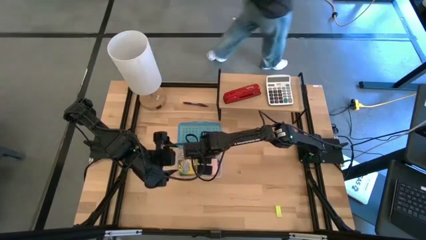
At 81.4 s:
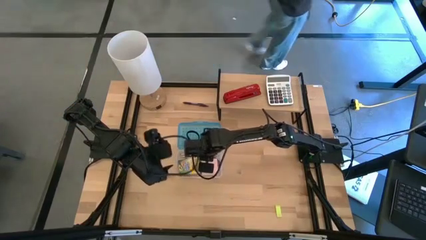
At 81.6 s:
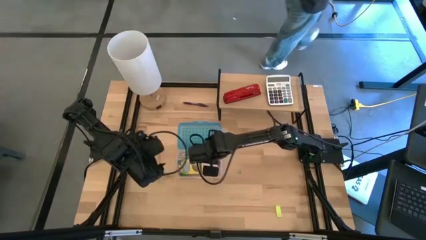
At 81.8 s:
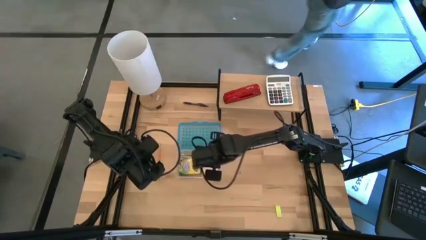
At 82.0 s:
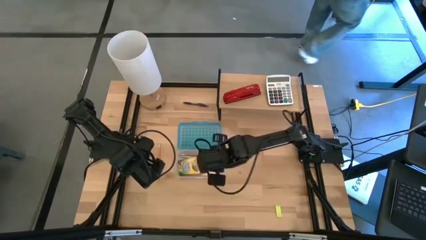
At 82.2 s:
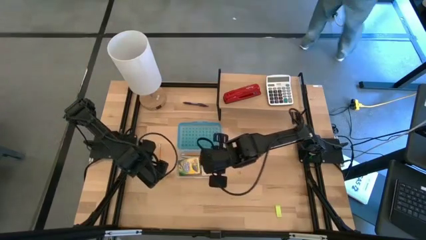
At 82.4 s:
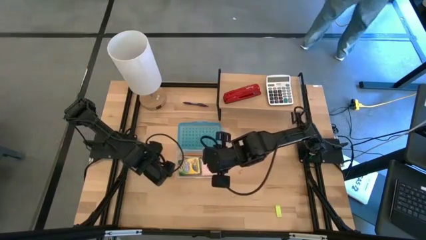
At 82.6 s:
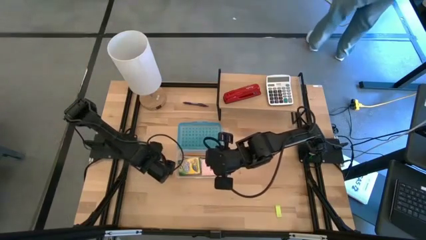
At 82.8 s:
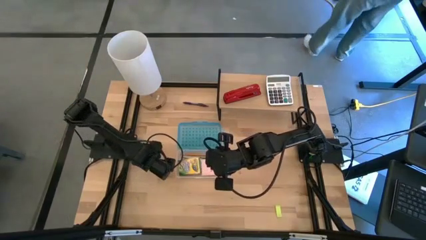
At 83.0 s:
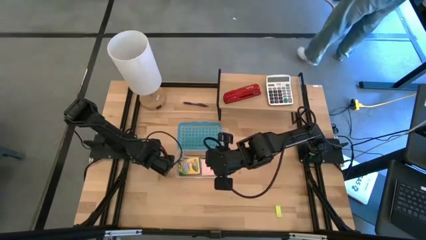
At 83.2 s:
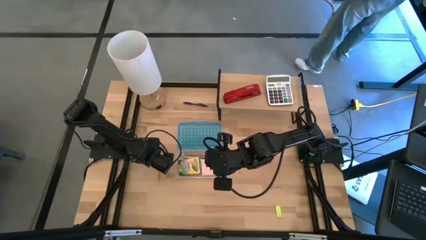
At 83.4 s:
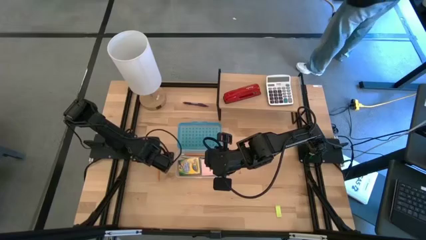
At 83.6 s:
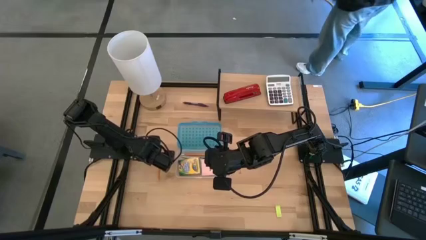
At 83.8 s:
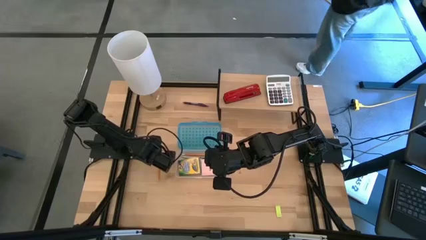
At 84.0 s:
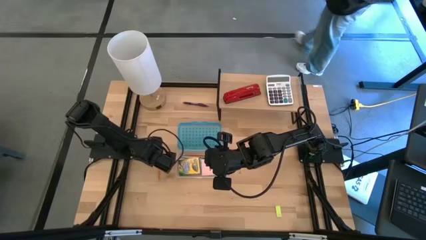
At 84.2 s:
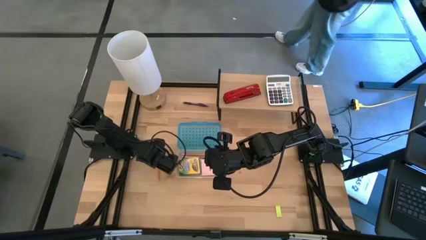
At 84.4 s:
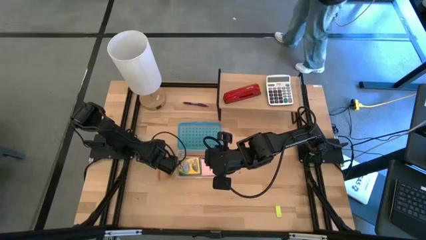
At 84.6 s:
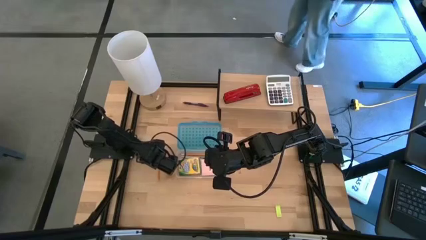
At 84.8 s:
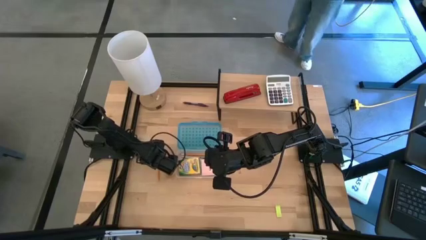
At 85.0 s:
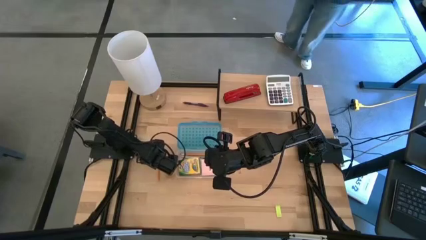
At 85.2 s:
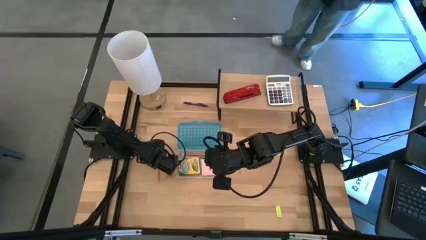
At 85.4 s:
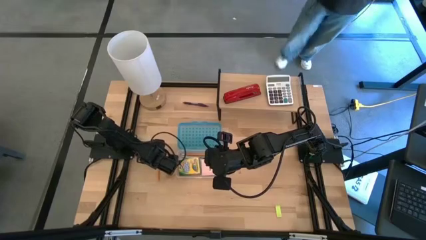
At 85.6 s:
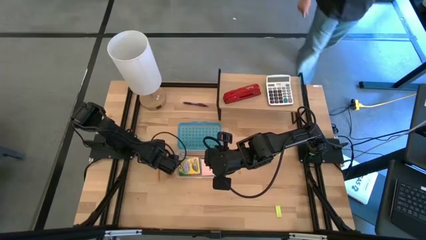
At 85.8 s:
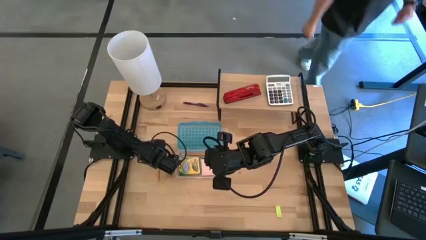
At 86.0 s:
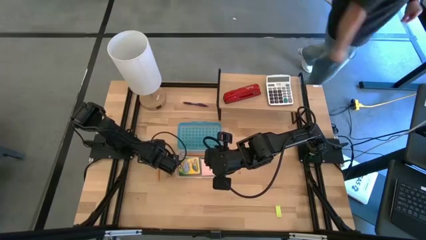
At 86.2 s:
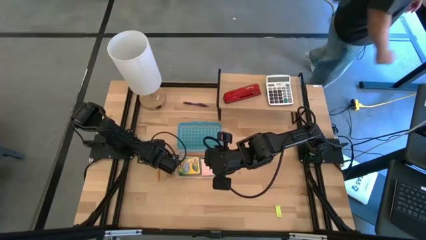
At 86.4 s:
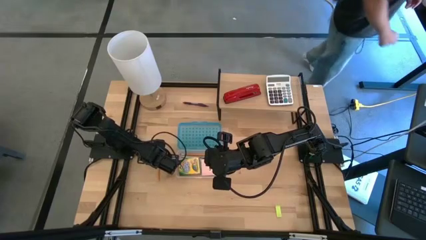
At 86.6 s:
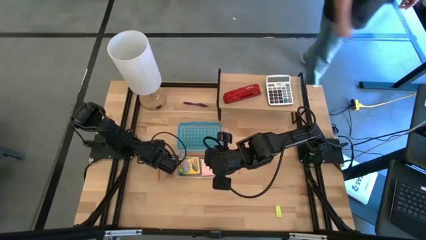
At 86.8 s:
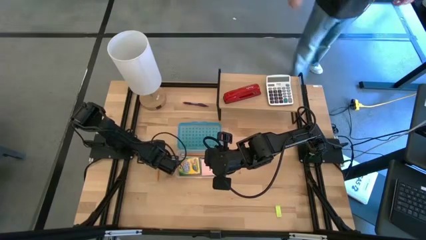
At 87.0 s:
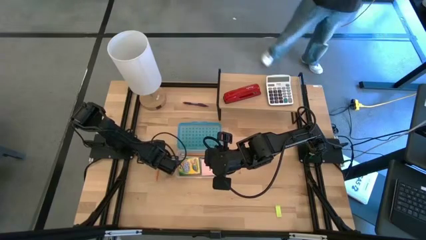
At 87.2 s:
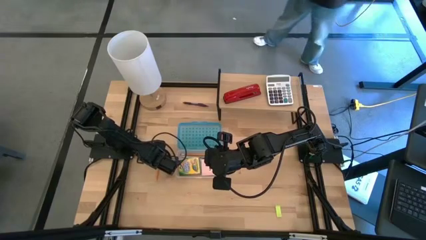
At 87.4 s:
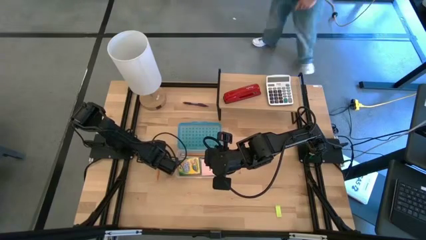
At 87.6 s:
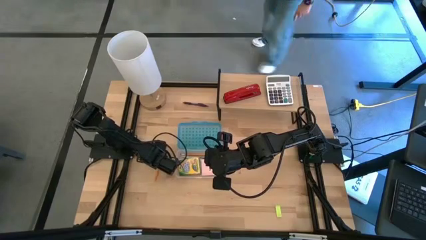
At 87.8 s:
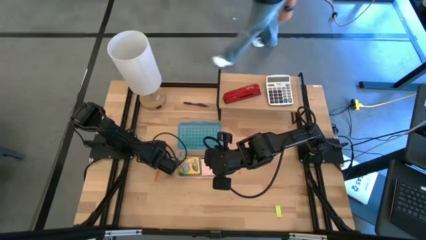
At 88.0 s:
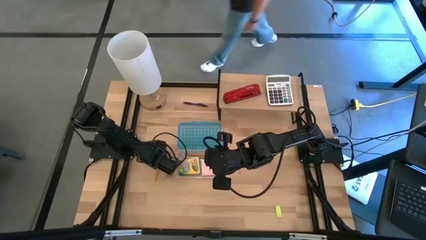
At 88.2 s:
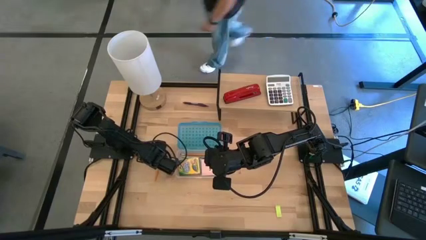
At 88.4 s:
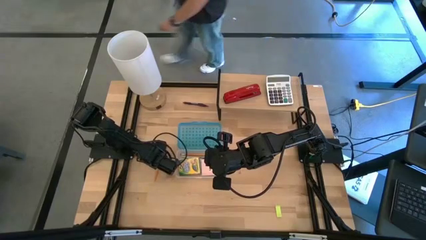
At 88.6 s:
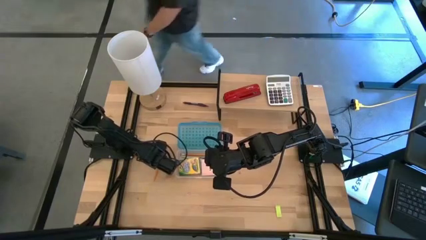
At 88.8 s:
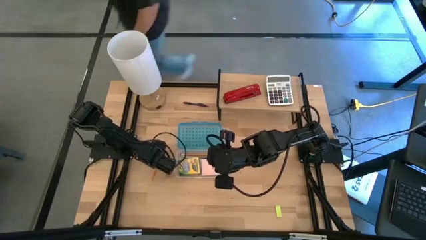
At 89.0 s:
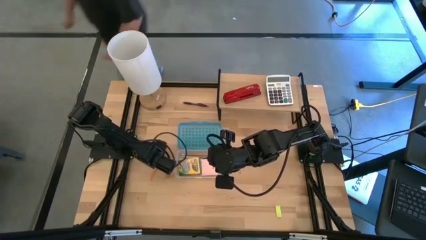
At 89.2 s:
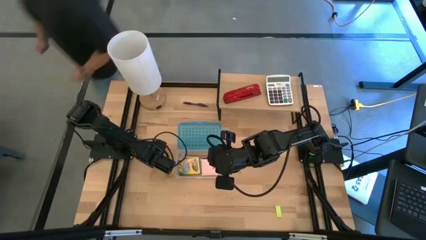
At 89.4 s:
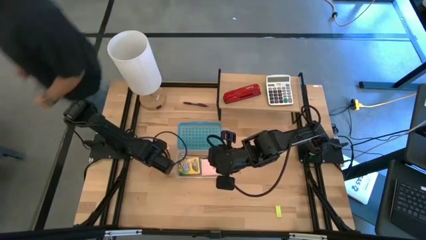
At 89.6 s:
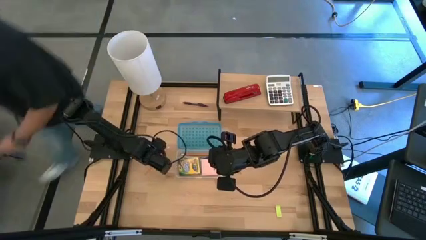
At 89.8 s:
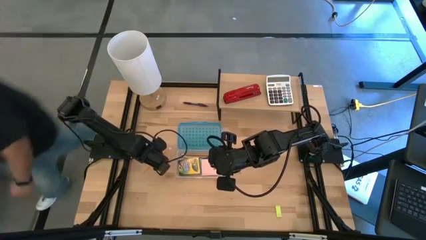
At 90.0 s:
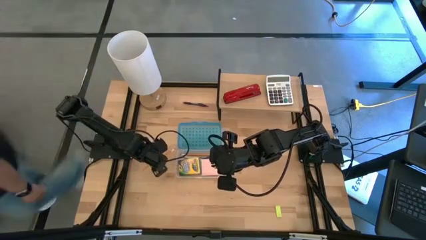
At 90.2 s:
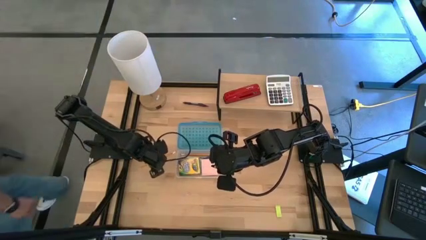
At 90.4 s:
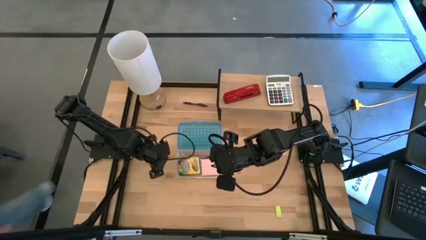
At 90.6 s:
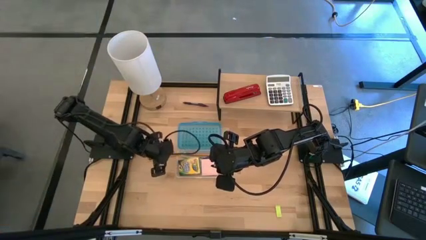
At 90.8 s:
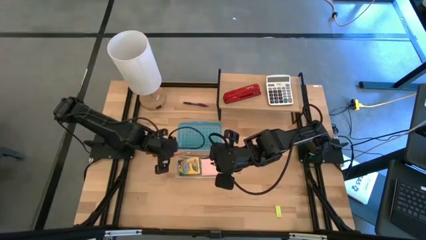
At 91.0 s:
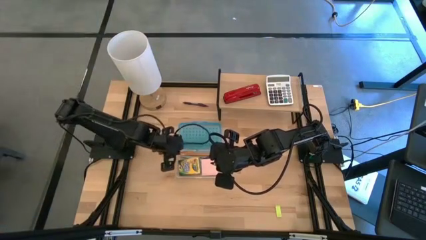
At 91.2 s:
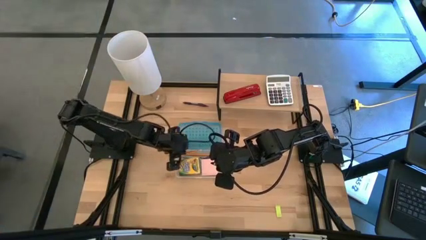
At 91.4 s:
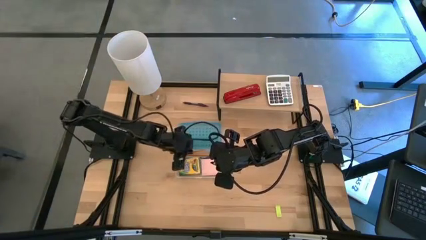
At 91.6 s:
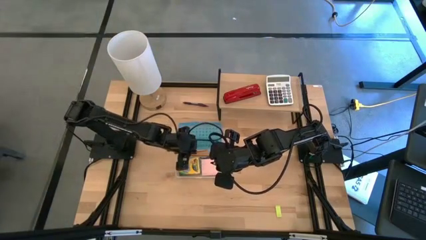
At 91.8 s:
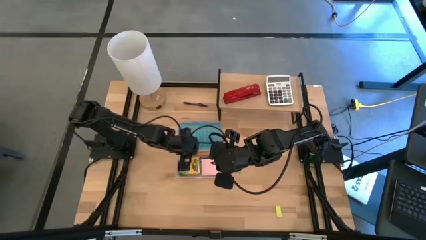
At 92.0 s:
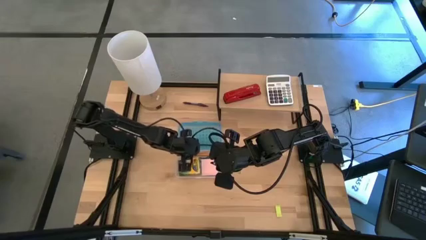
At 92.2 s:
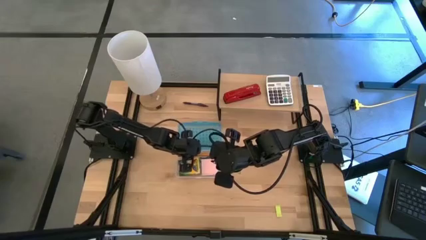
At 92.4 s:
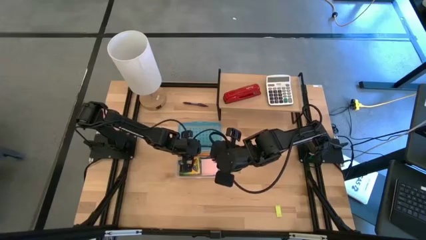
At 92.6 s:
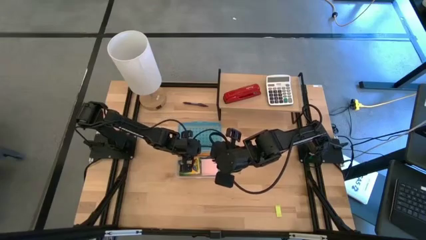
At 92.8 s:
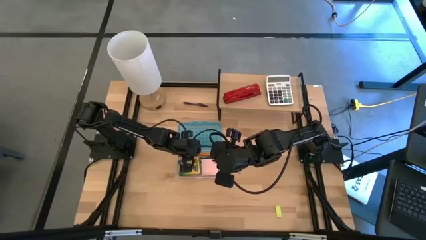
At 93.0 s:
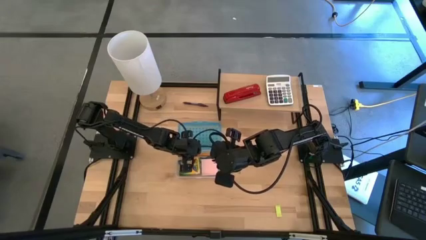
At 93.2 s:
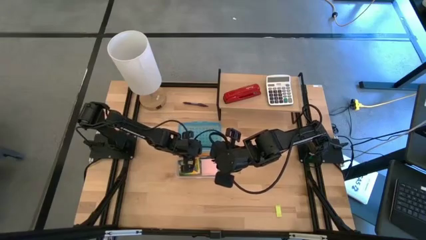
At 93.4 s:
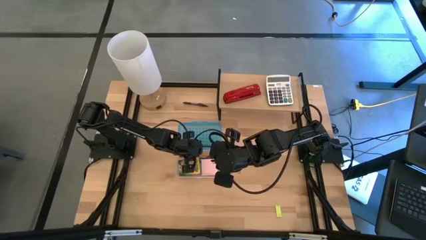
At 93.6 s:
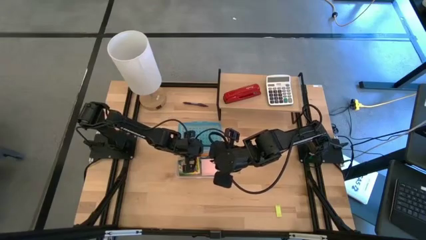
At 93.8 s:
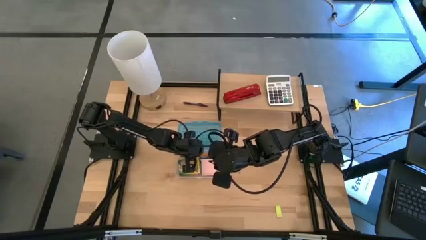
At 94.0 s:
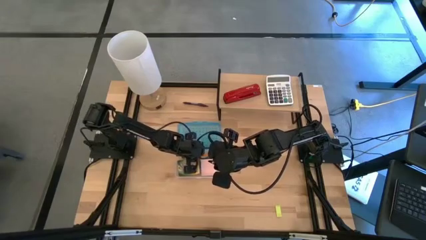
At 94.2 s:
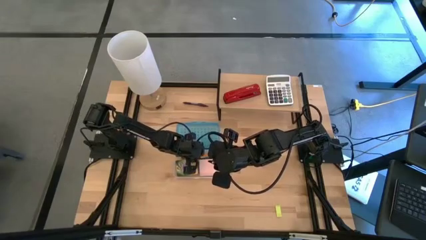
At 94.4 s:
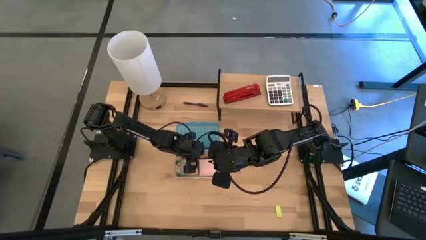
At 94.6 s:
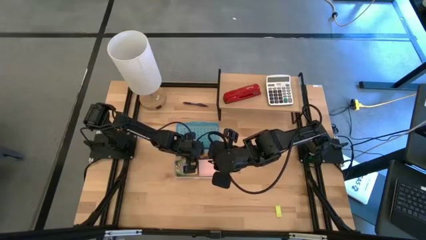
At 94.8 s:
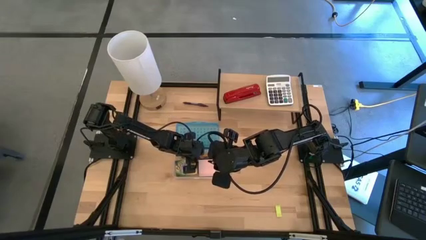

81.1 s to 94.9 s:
Task: Pack school essentials
Put the yellow pencil into the blue supply box

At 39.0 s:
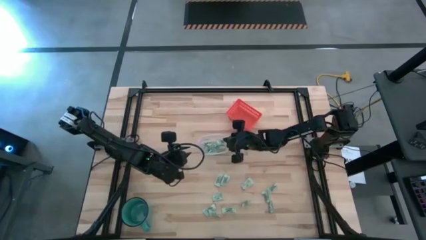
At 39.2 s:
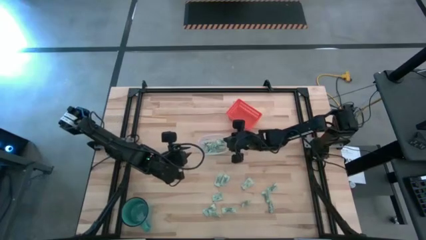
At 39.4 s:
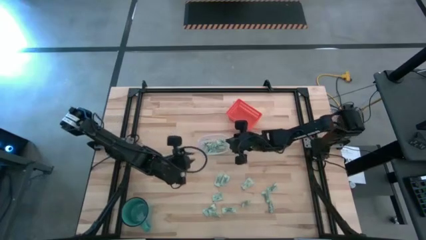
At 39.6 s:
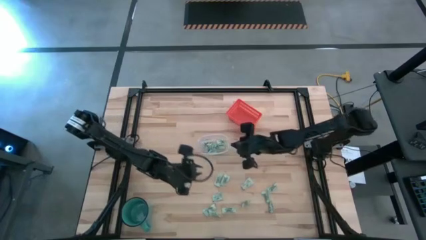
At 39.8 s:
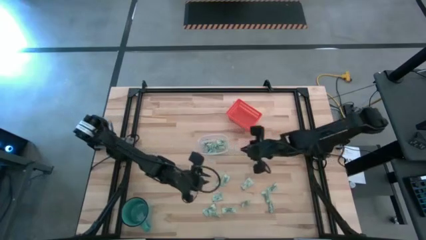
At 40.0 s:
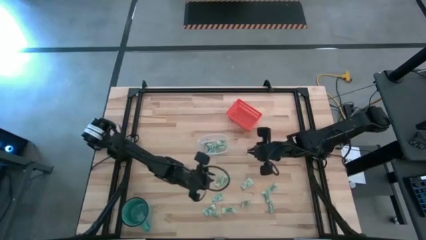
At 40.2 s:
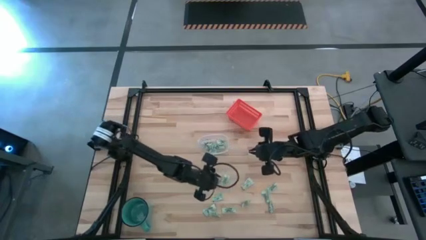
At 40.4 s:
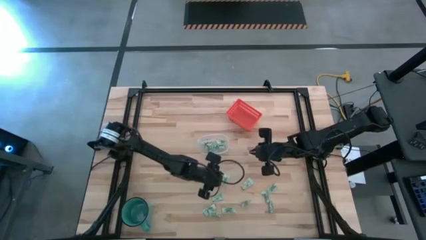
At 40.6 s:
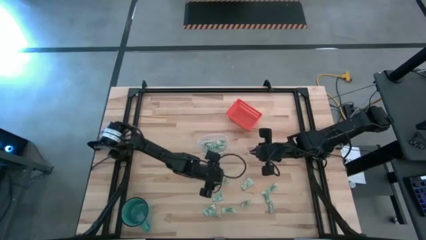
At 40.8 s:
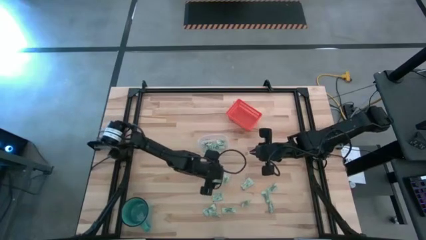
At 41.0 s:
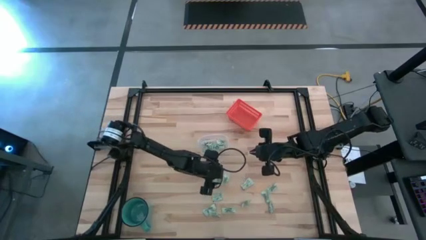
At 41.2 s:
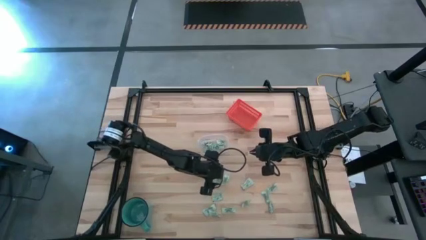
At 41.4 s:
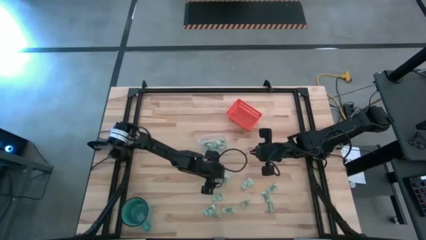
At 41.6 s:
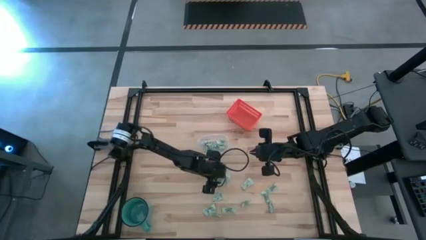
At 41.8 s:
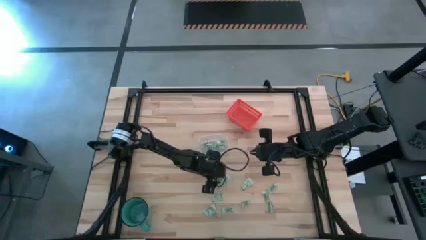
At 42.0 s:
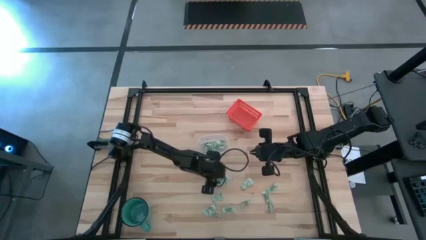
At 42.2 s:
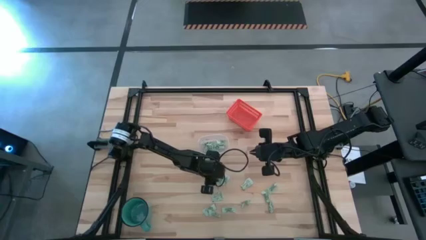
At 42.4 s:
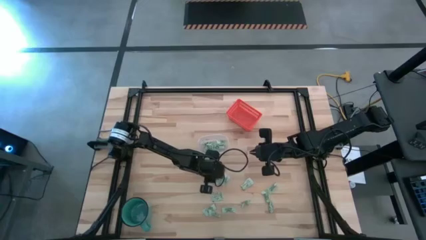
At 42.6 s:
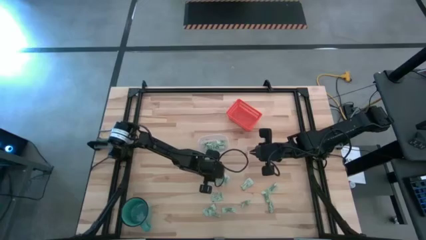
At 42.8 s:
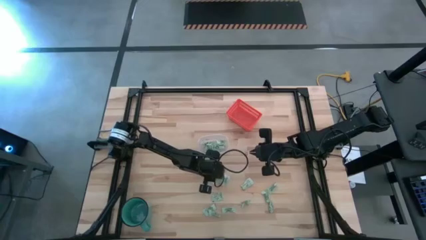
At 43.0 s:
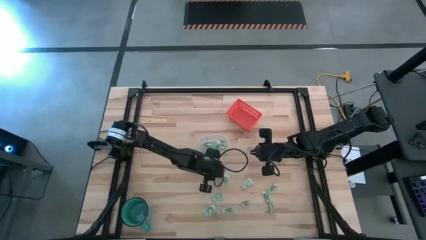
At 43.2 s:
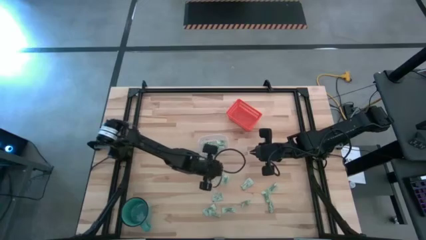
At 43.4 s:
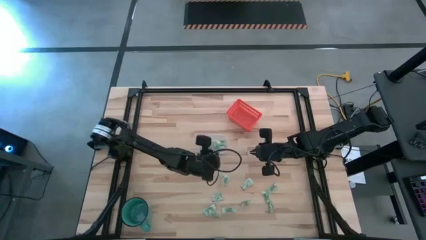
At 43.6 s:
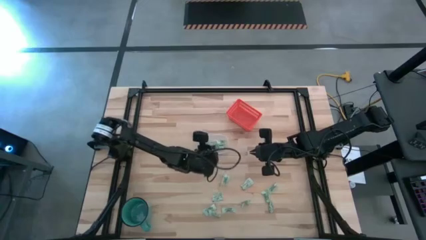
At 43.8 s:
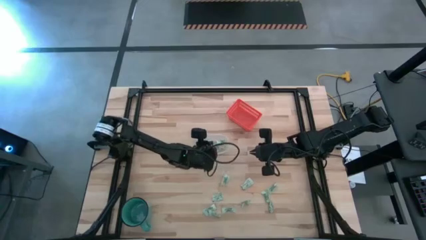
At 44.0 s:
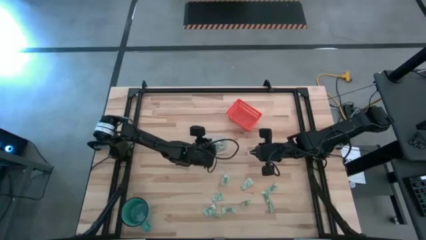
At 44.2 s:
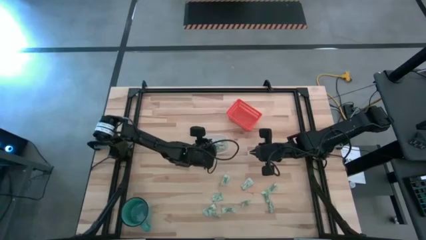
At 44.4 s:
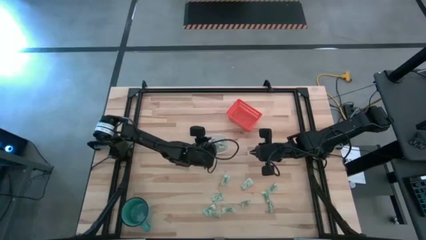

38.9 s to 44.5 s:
Task: Pick and place items into bin
Put the stevia packet into the transparent bin
